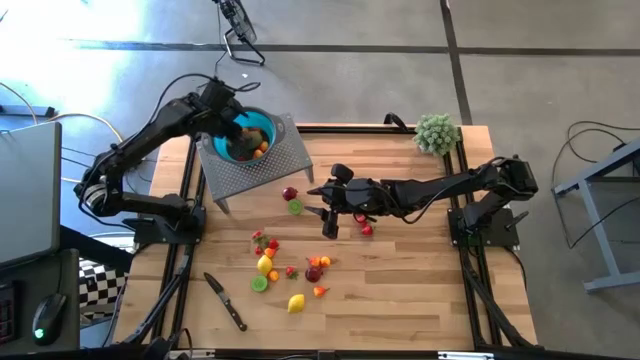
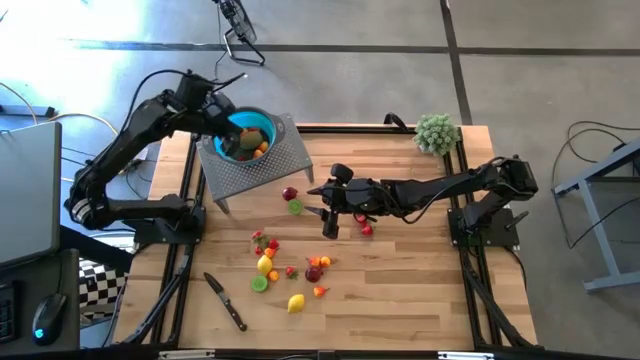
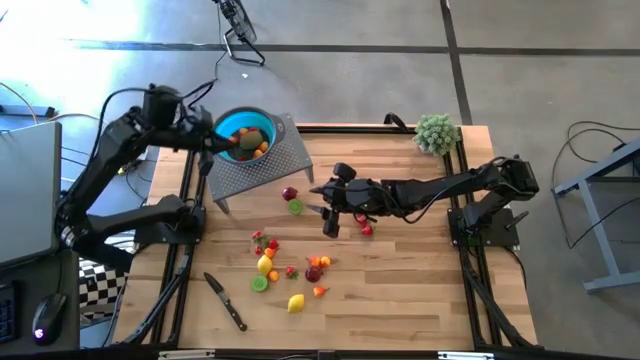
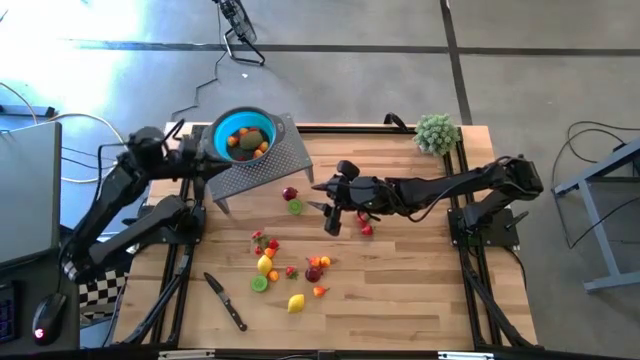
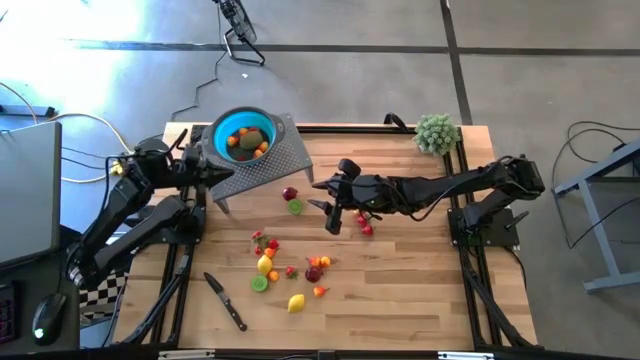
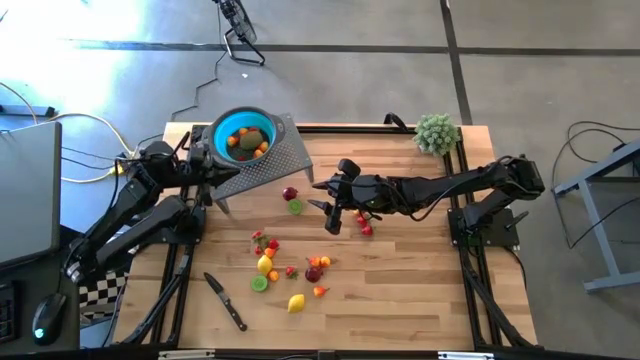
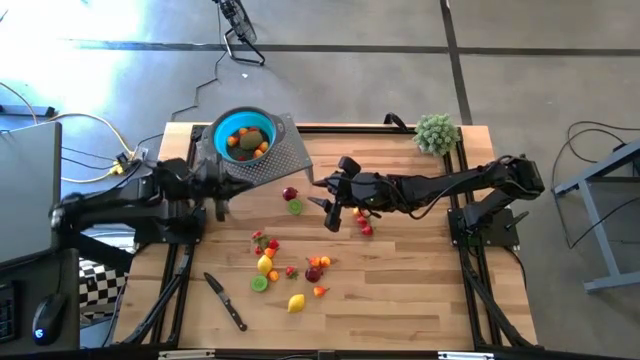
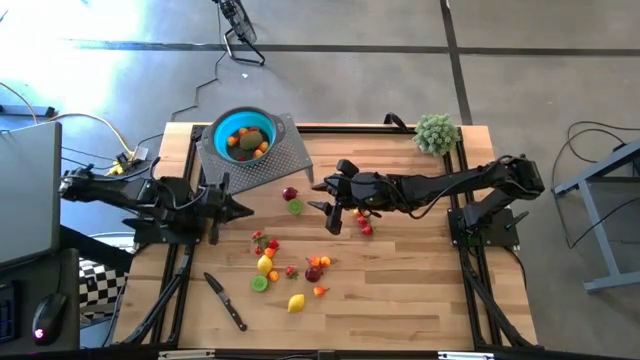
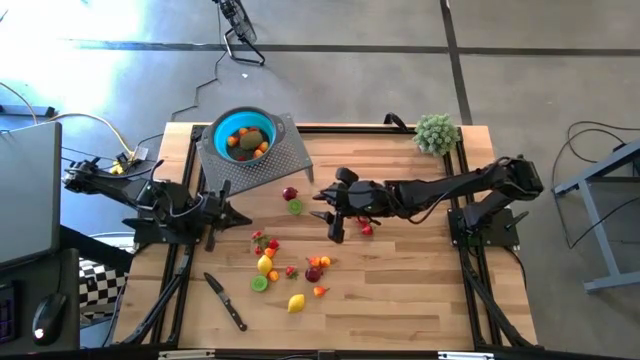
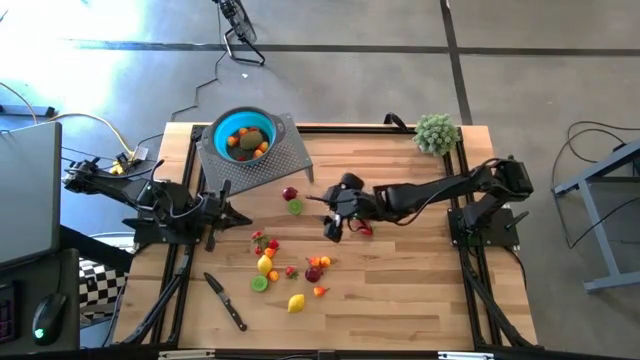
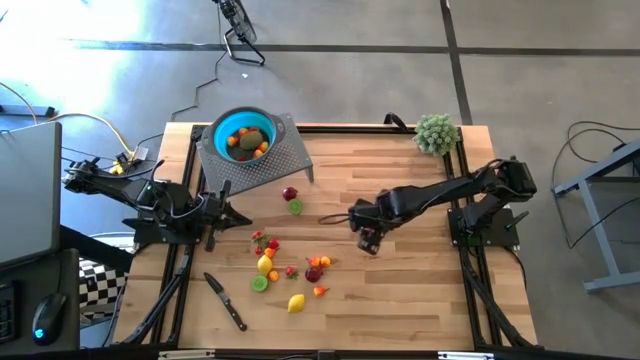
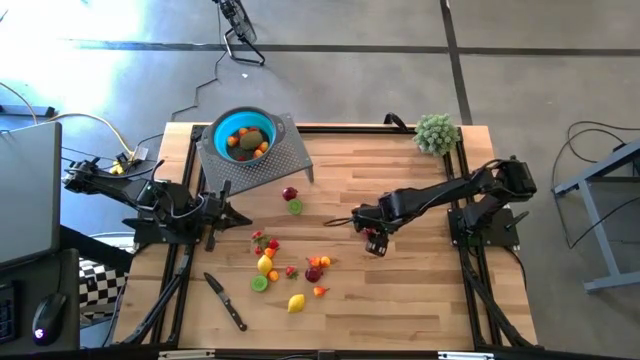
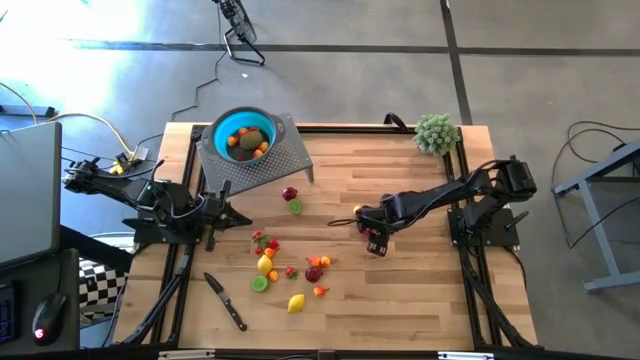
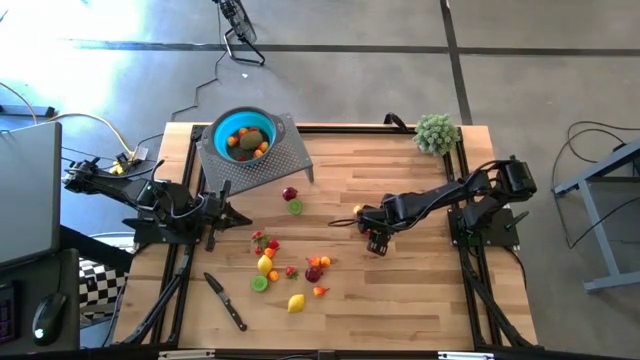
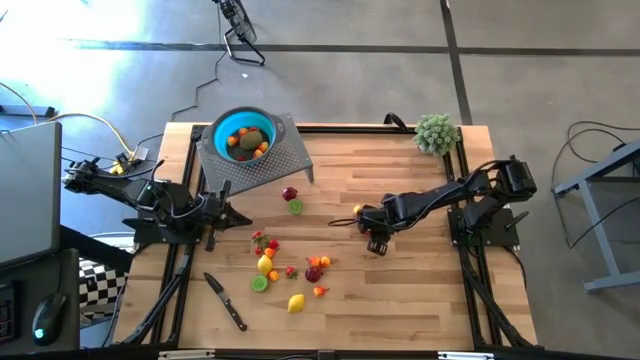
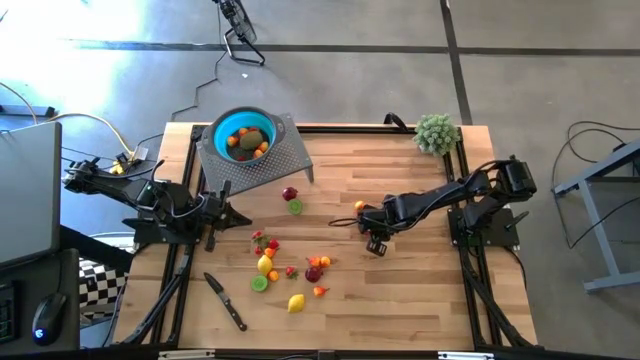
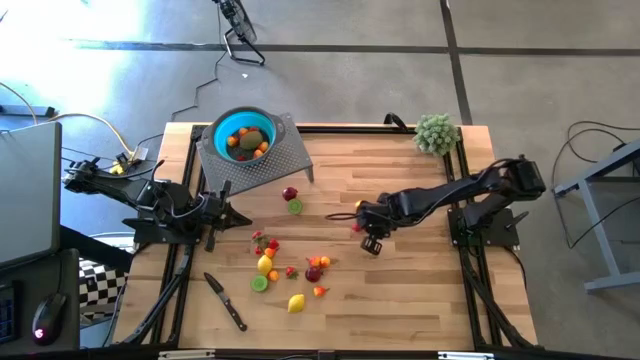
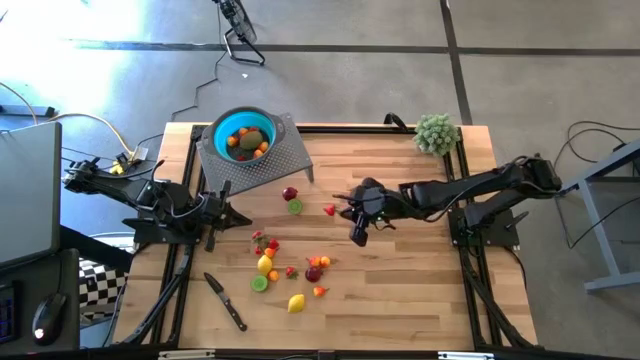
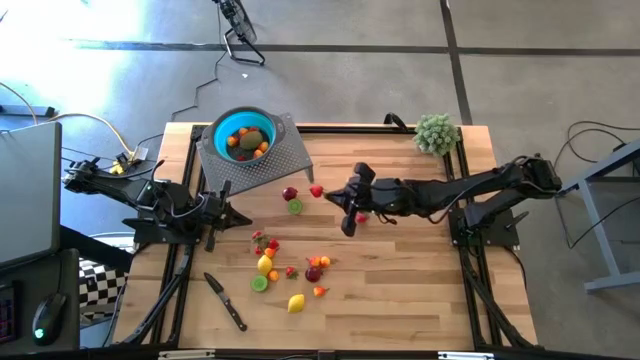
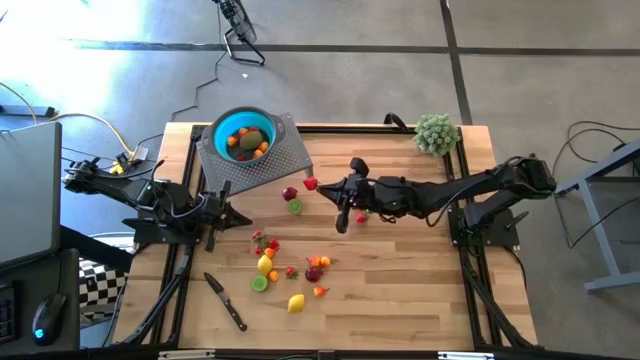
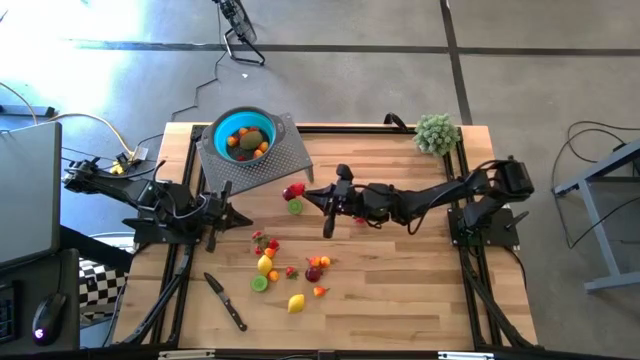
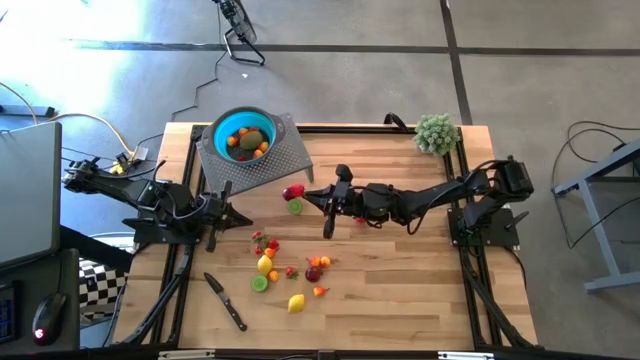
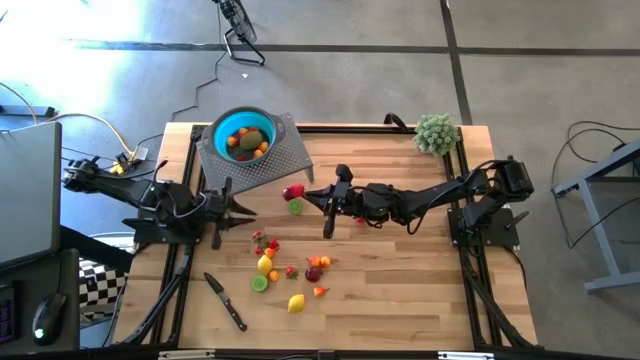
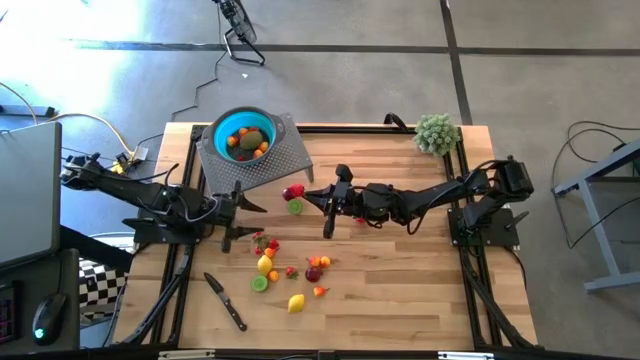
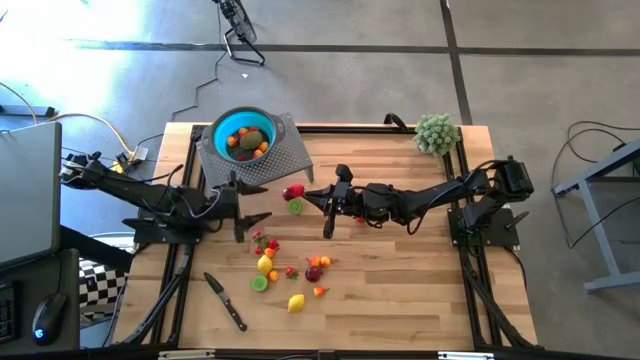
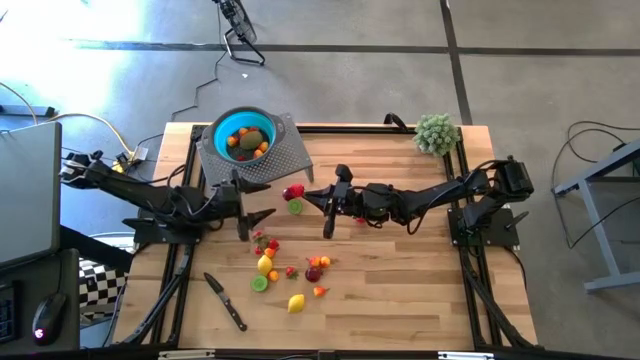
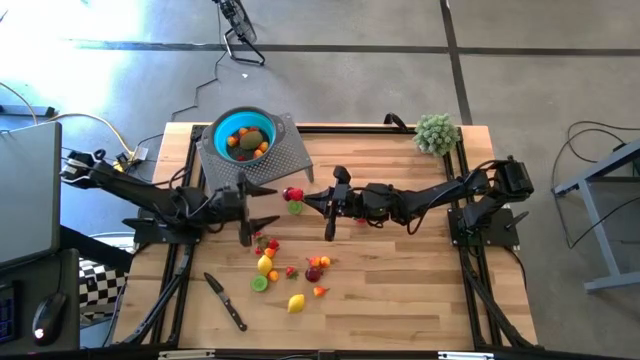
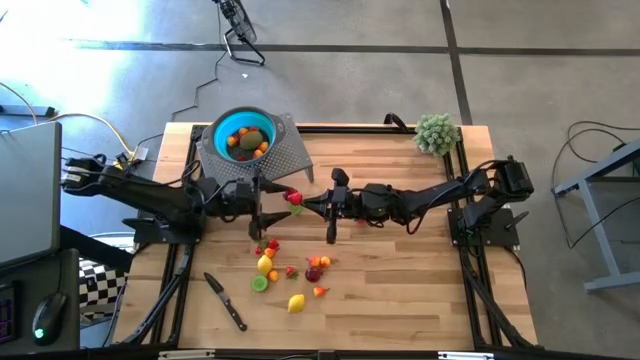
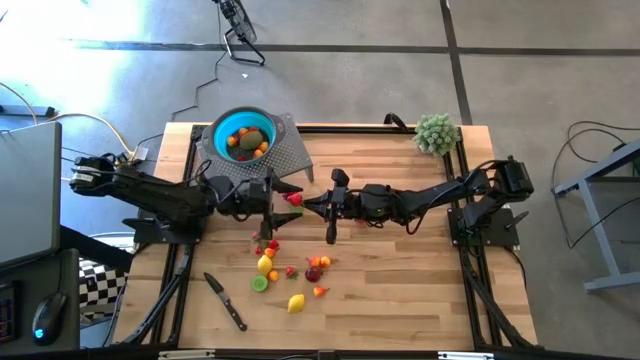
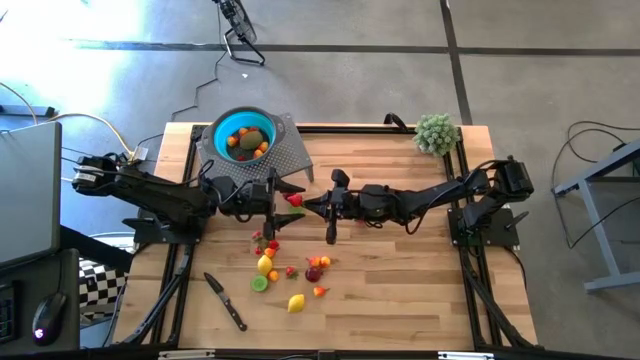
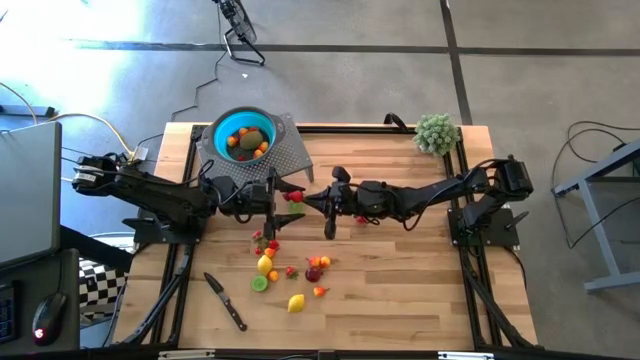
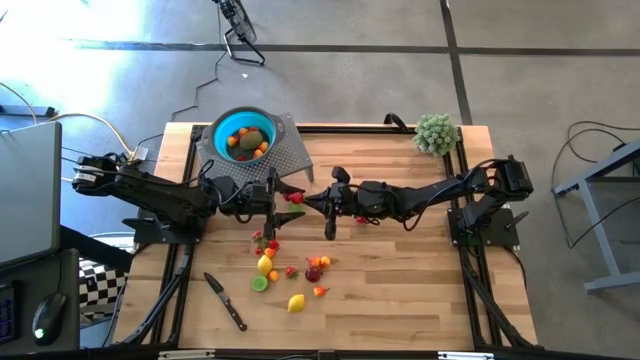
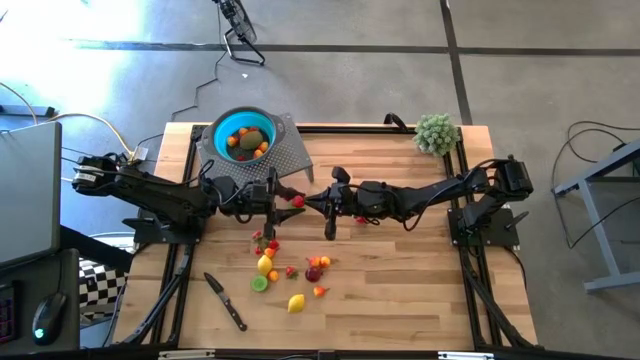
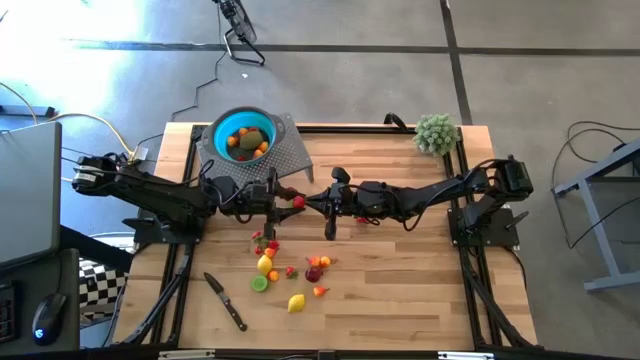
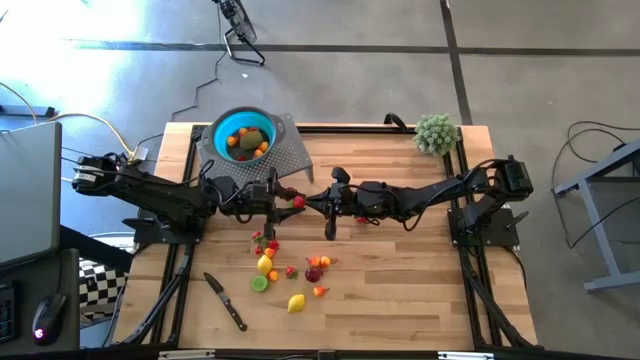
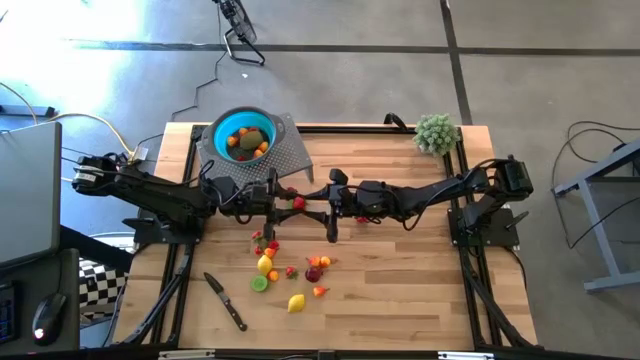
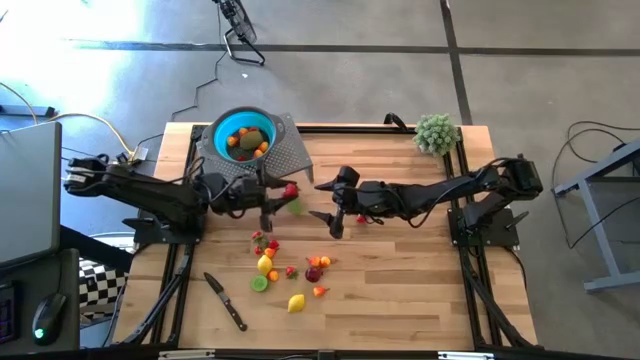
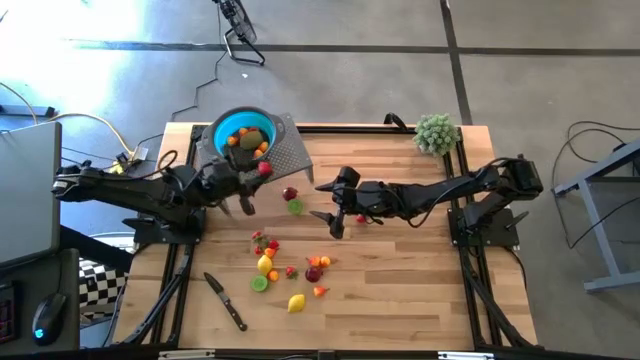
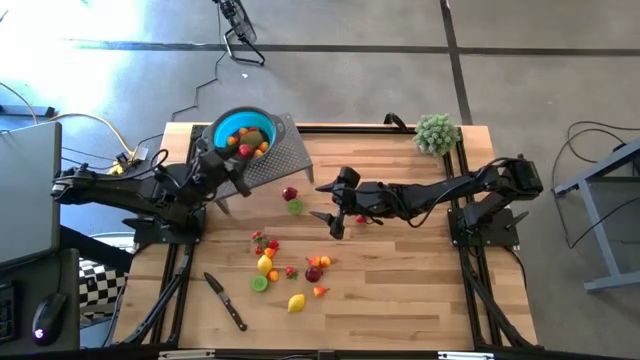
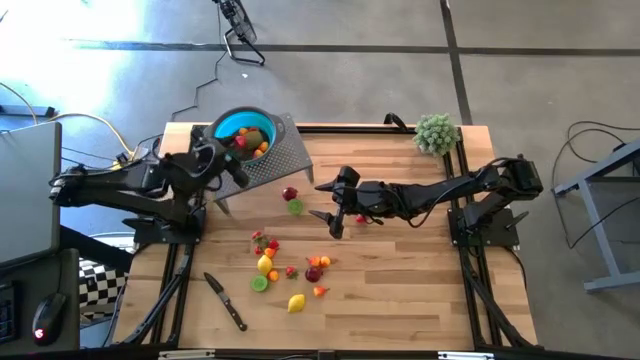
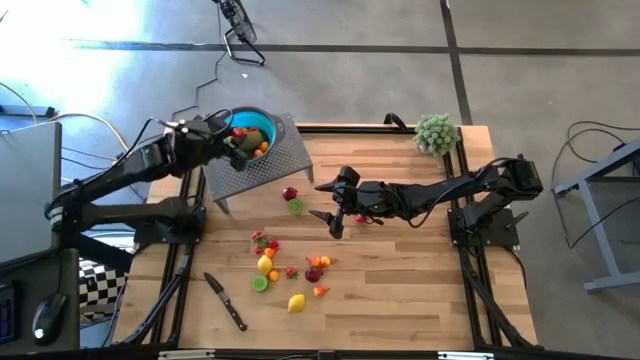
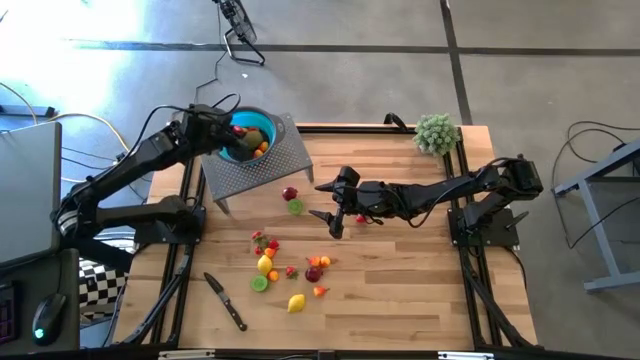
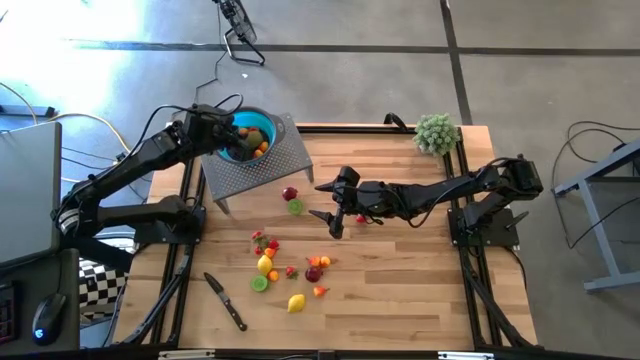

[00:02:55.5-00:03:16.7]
Task: Pick & Place Fruit
Put the red strawberry into the blue strainer bowl on the shelf
